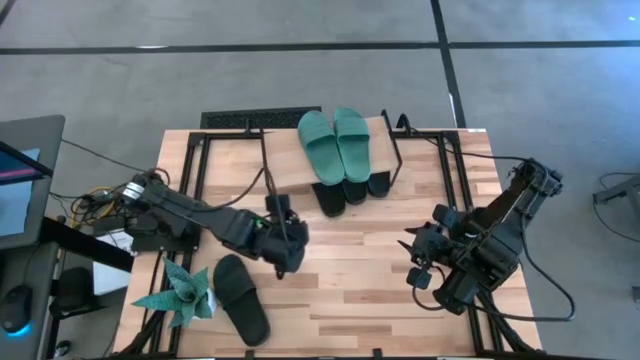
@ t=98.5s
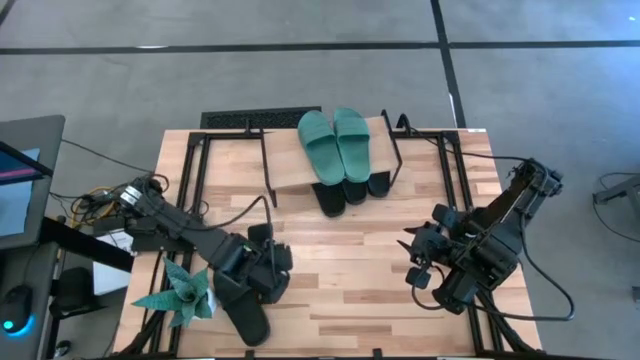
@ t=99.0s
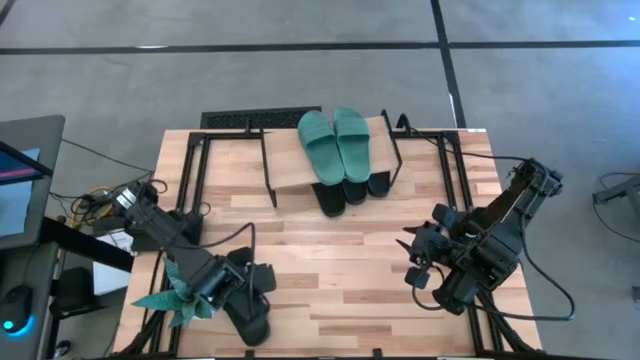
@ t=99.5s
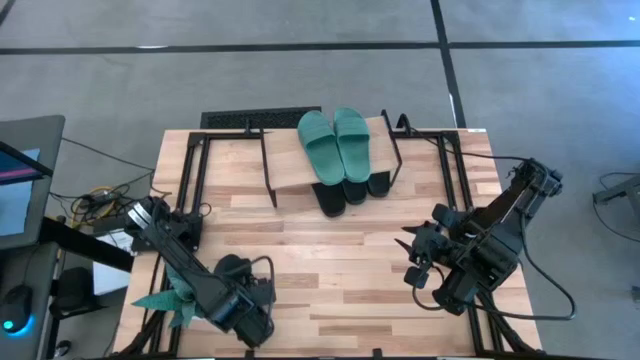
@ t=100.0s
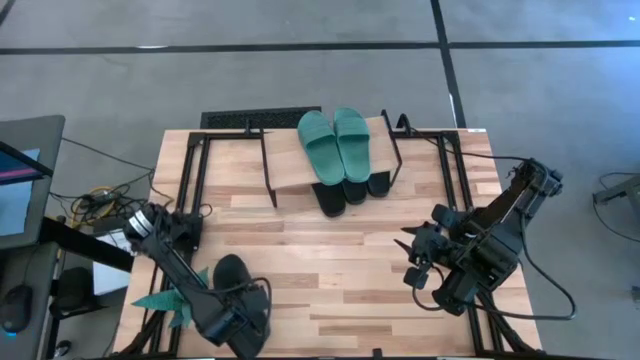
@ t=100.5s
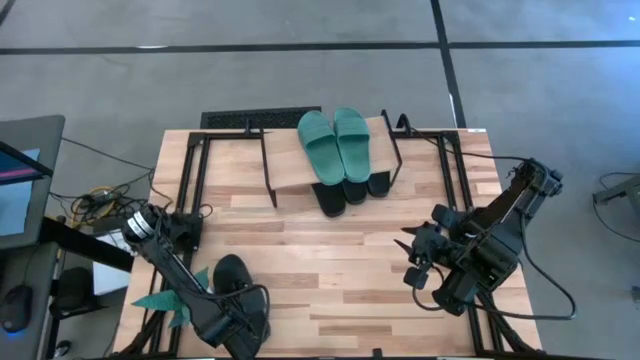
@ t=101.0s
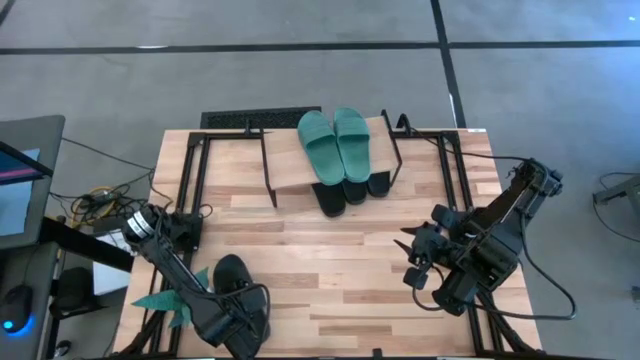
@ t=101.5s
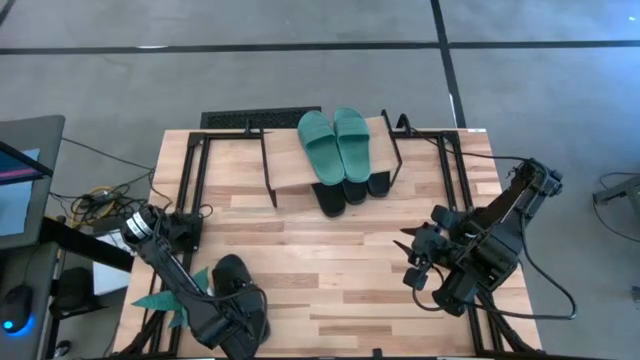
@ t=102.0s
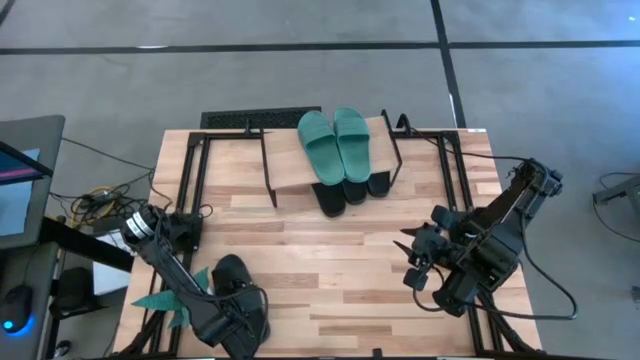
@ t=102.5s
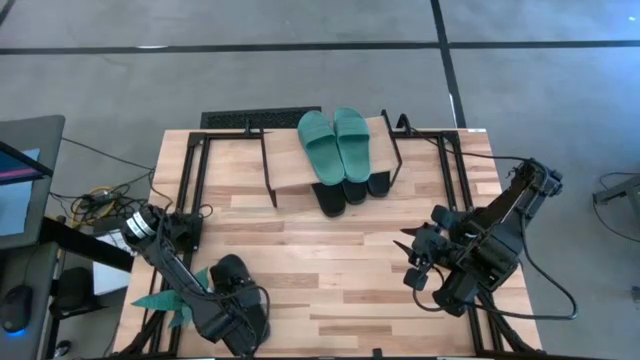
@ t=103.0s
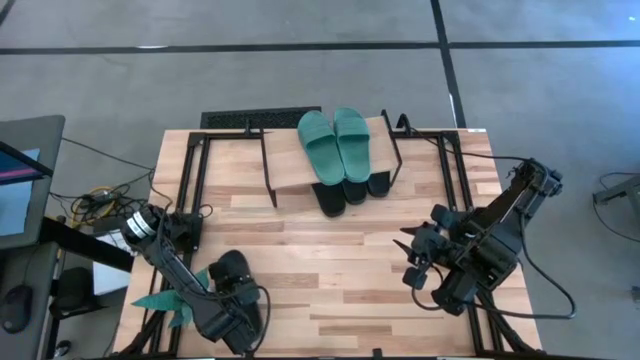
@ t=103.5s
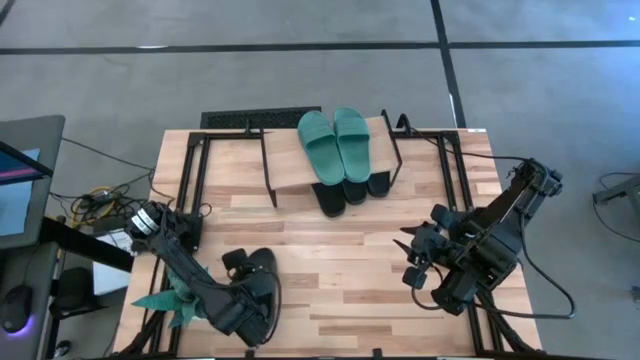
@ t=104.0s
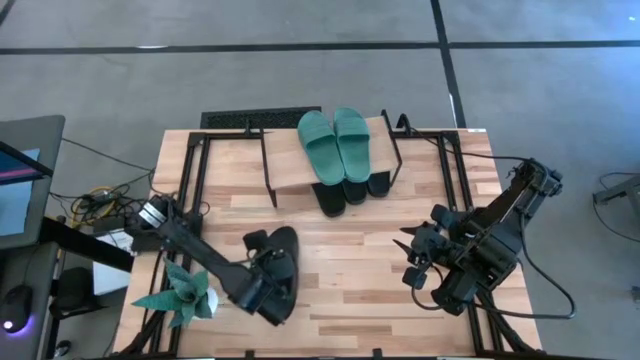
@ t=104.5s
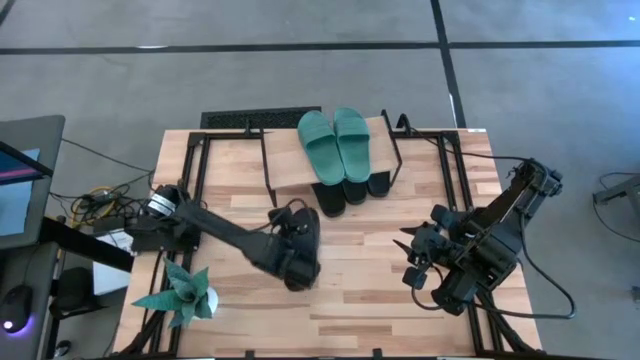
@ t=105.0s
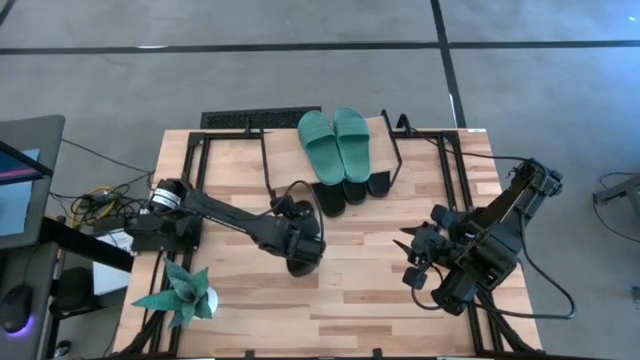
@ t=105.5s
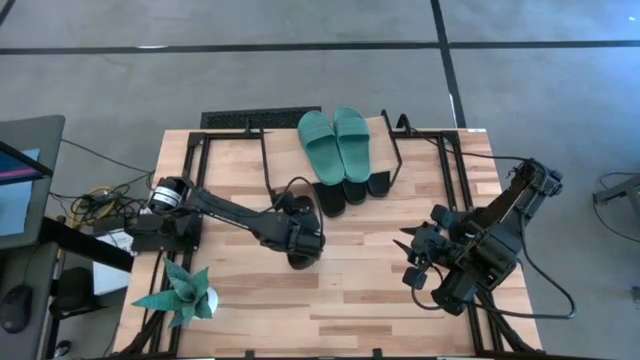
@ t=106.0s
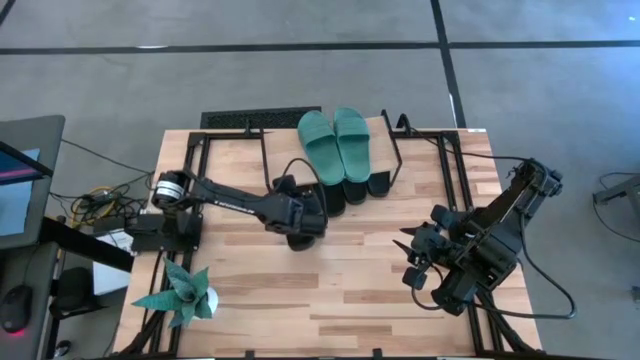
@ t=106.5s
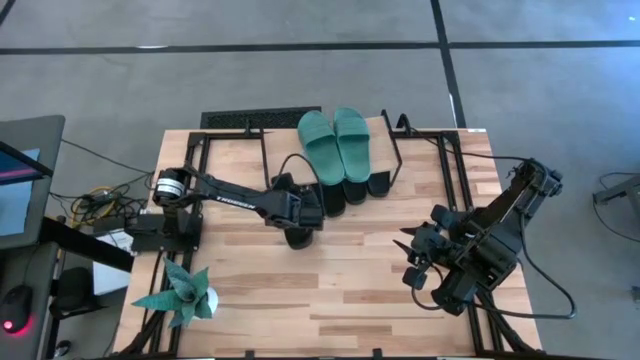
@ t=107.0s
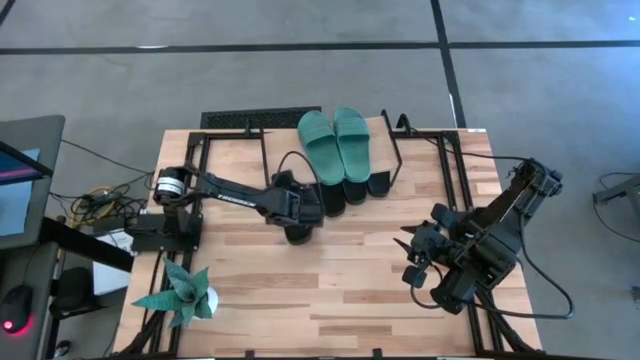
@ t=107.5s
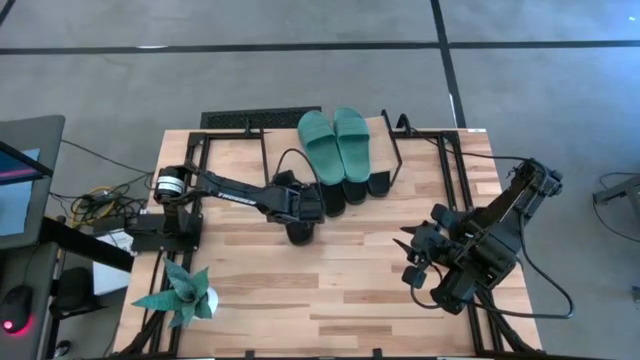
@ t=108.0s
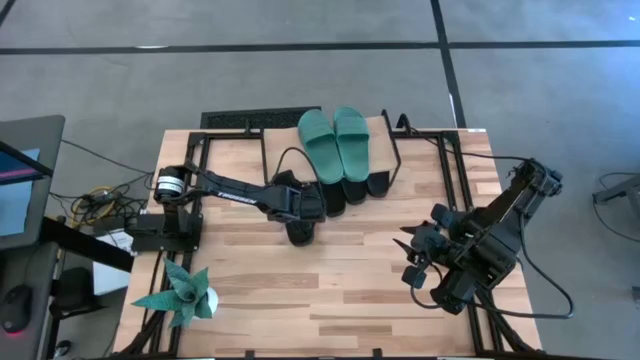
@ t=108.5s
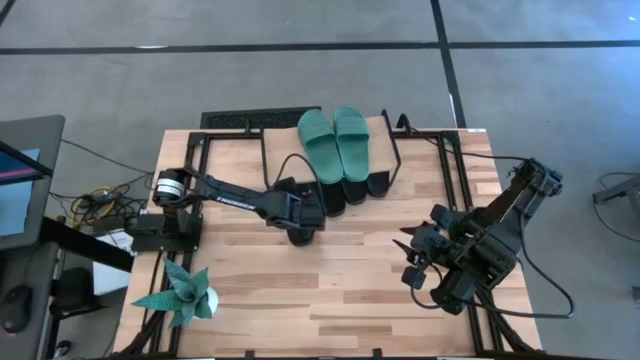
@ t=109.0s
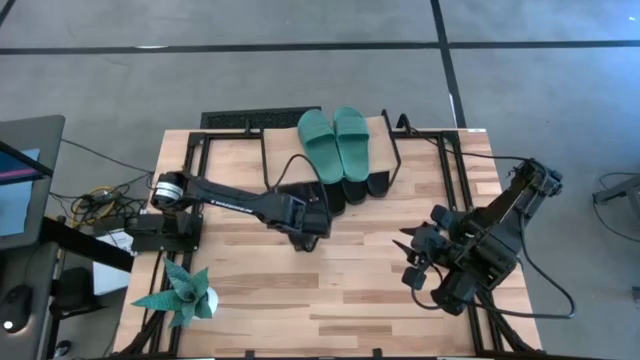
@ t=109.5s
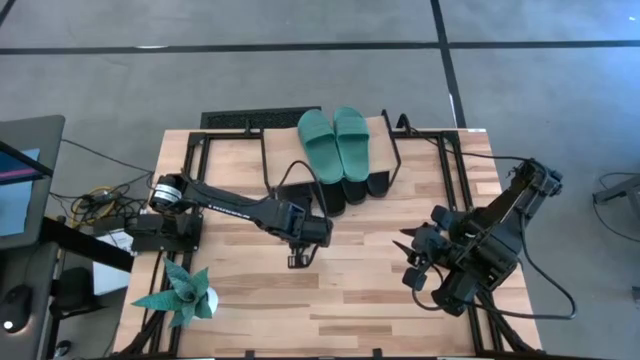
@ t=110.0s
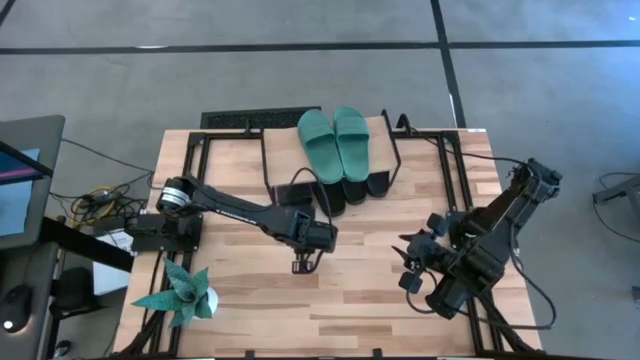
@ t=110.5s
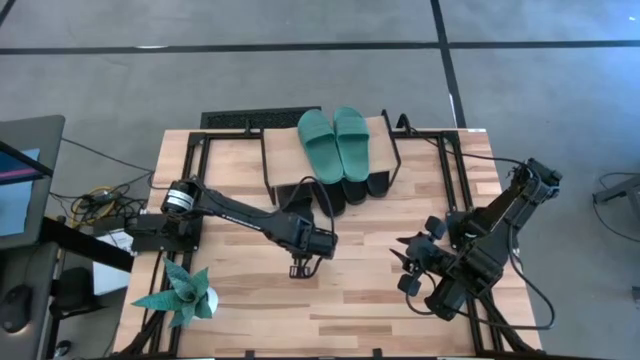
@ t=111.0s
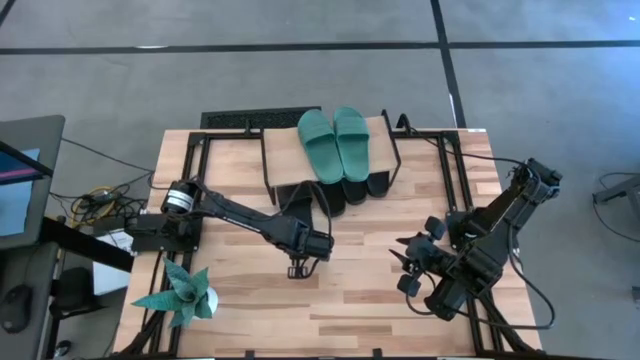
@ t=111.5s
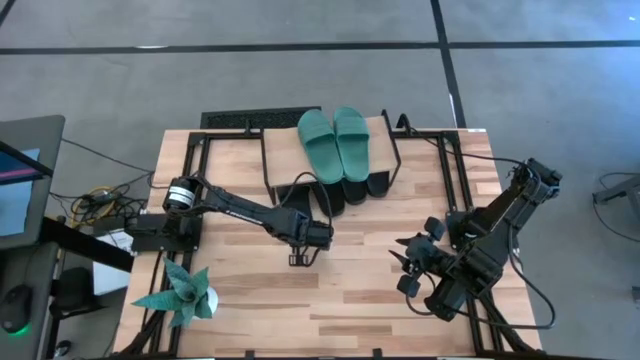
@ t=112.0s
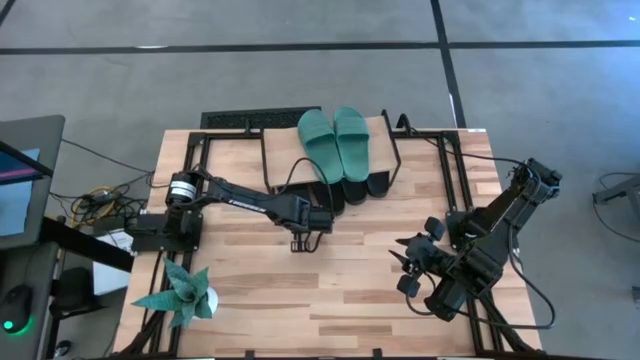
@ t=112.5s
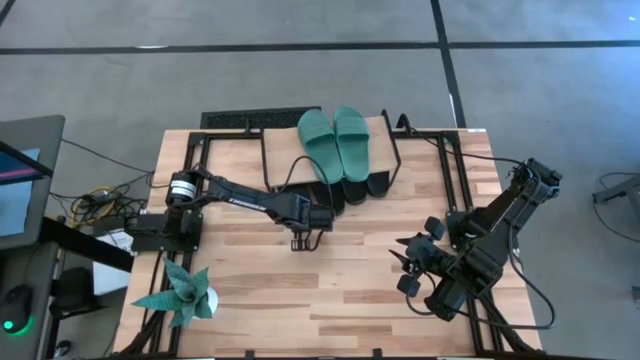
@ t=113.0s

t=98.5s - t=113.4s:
Task: Pick and place slides into the shelf
Put the black slide under the shelf

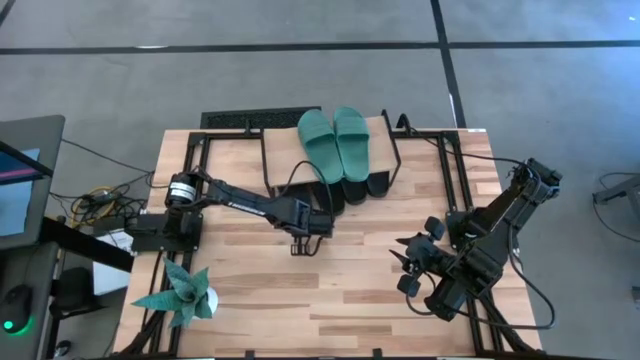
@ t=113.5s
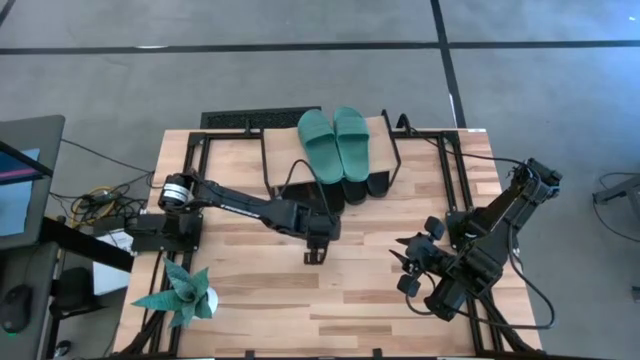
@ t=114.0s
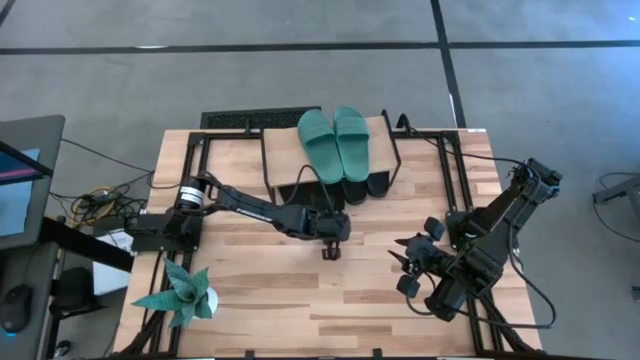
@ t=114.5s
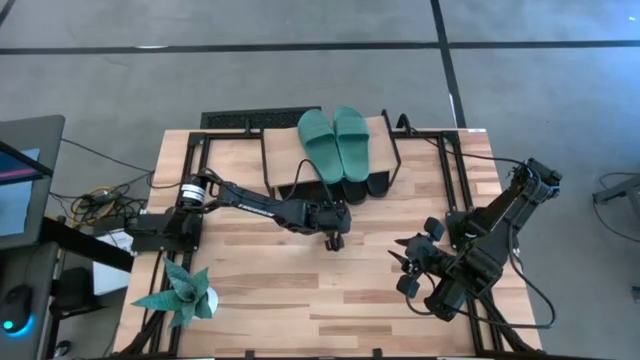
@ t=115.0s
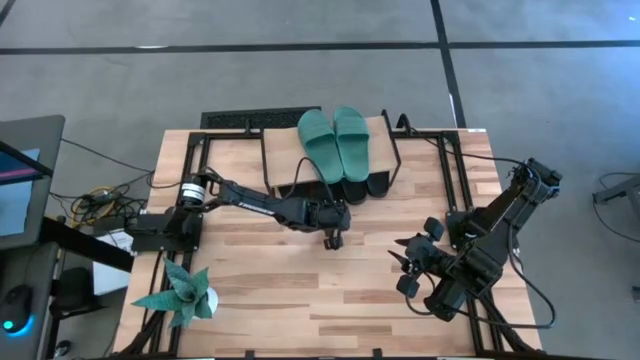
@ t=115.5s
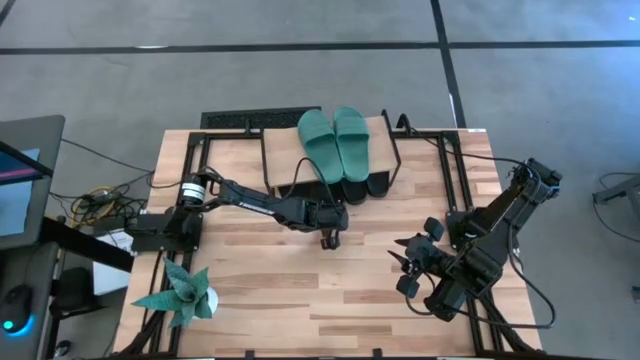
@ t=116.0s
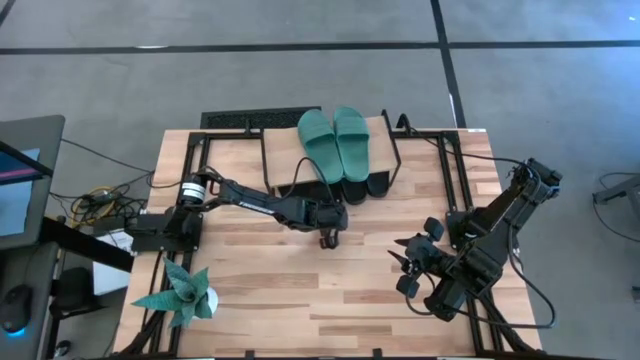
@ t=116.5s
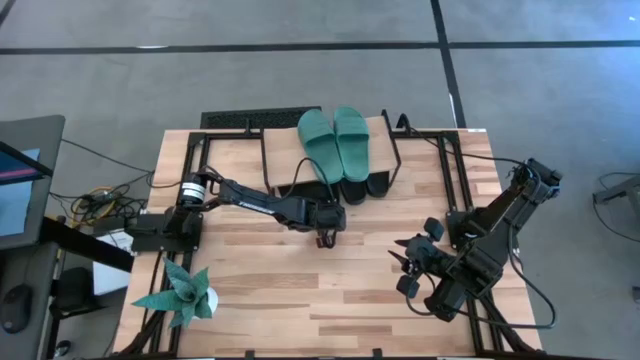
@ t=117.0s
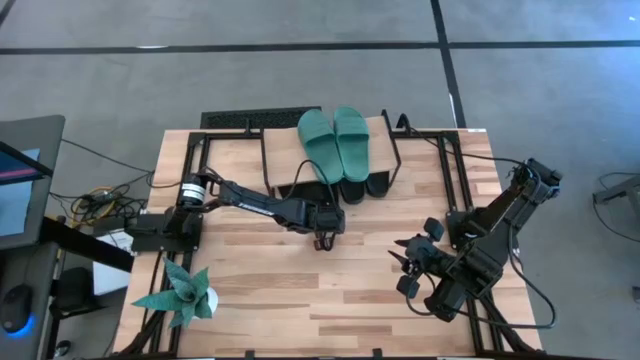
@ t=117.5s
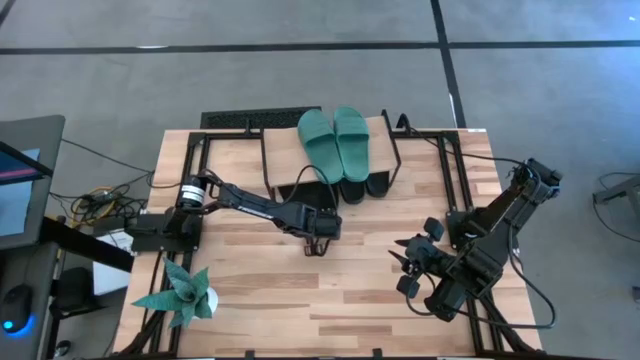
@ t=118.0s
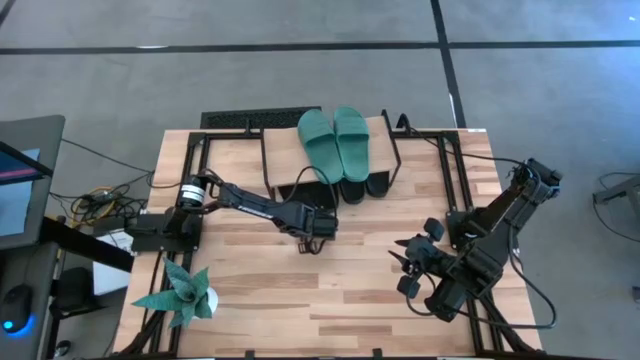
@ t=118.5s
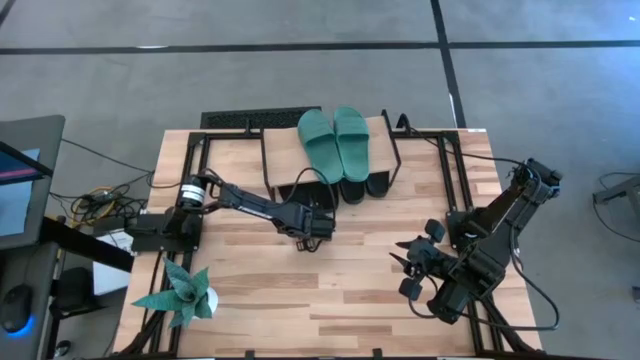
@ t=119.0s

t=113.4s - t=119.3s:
Adjust the black slides under the shelf
